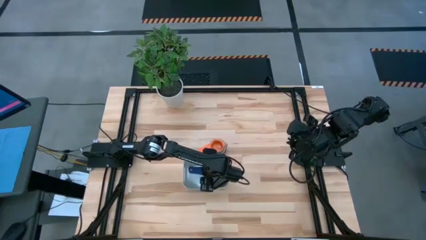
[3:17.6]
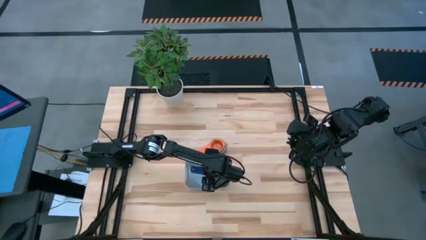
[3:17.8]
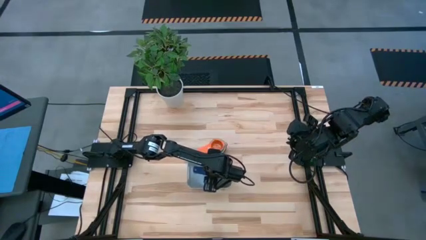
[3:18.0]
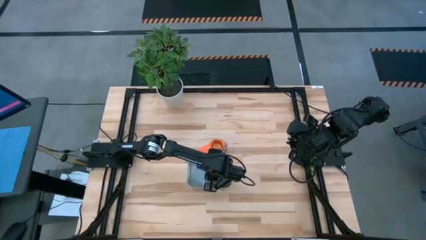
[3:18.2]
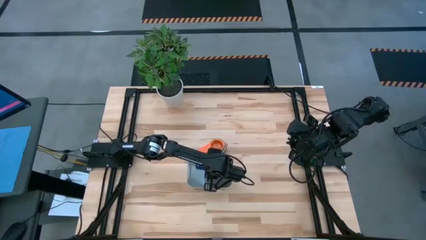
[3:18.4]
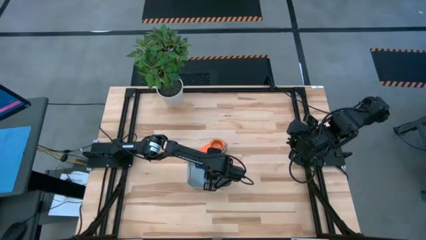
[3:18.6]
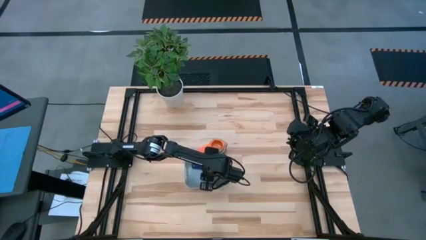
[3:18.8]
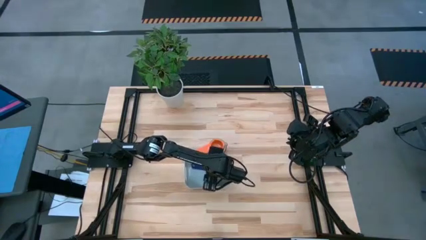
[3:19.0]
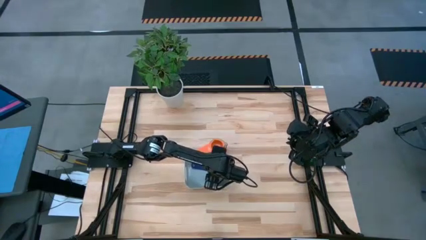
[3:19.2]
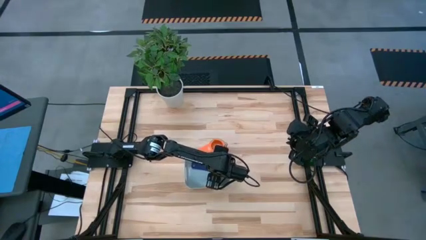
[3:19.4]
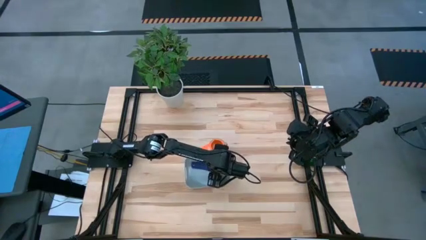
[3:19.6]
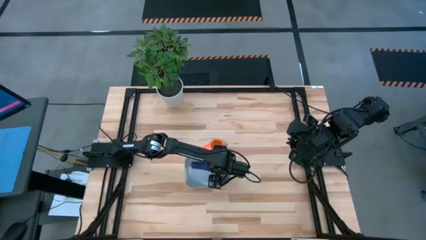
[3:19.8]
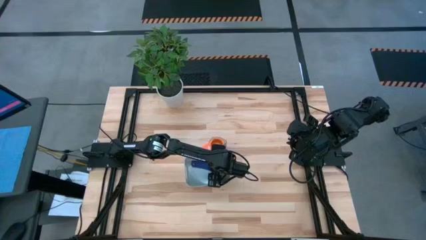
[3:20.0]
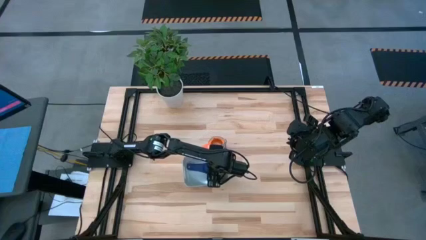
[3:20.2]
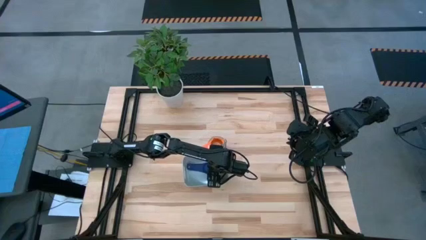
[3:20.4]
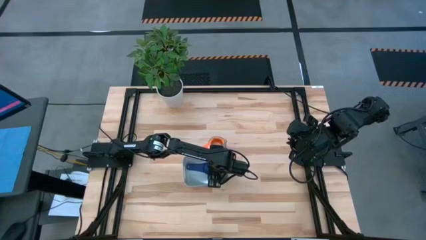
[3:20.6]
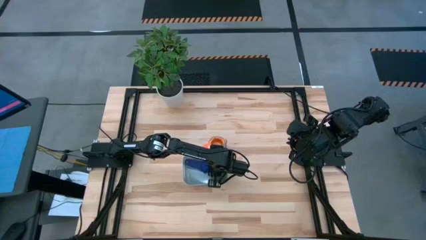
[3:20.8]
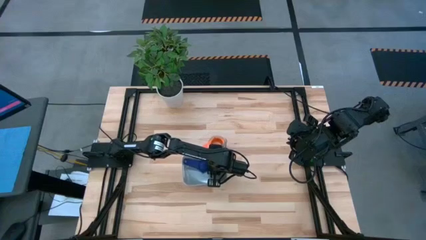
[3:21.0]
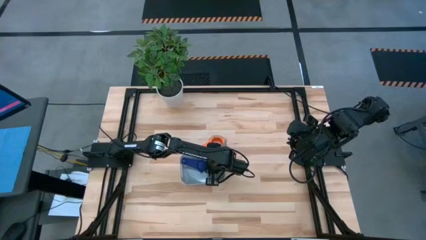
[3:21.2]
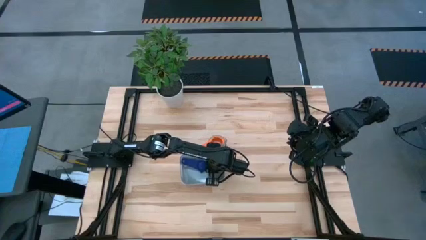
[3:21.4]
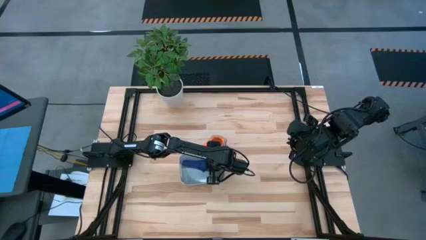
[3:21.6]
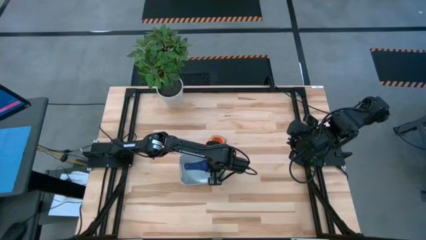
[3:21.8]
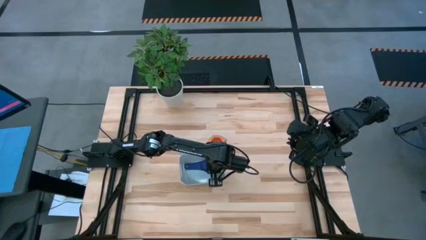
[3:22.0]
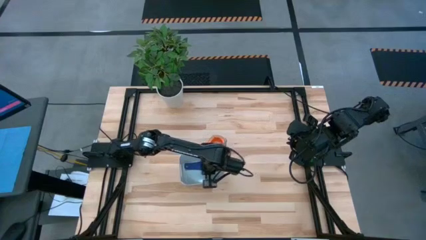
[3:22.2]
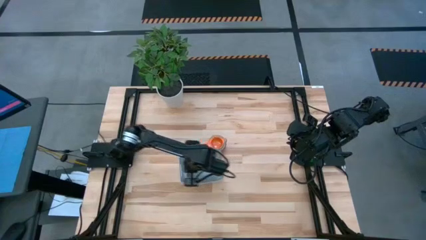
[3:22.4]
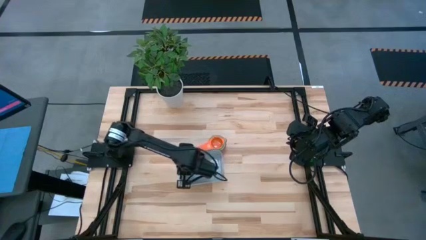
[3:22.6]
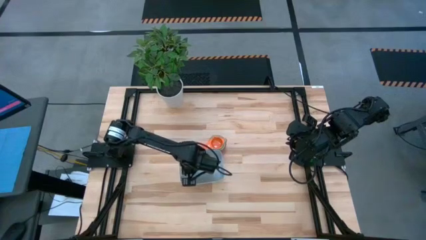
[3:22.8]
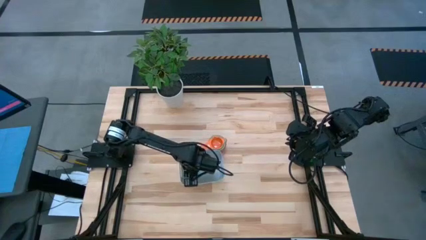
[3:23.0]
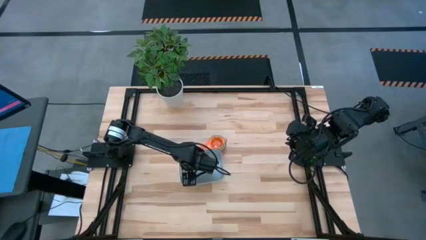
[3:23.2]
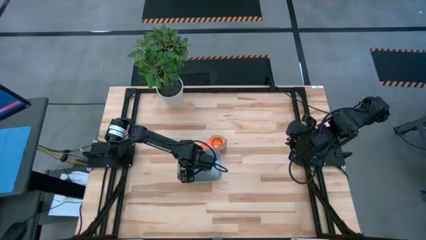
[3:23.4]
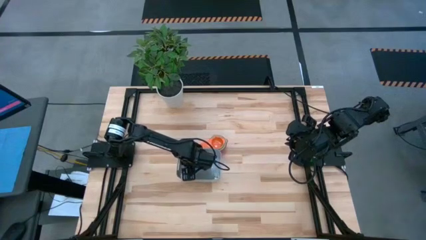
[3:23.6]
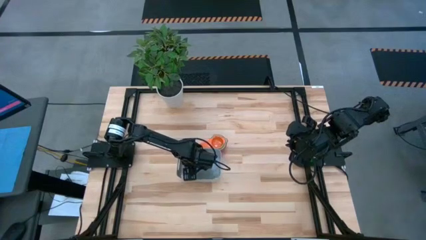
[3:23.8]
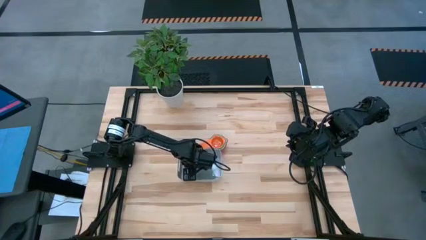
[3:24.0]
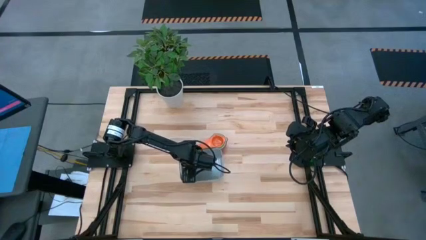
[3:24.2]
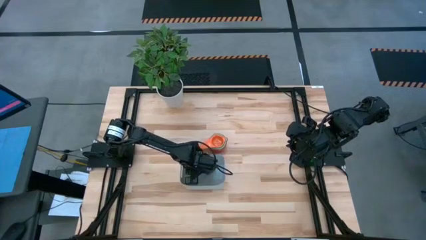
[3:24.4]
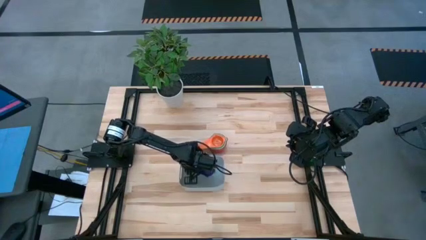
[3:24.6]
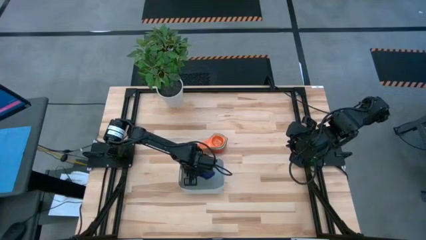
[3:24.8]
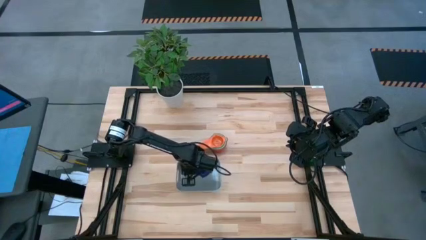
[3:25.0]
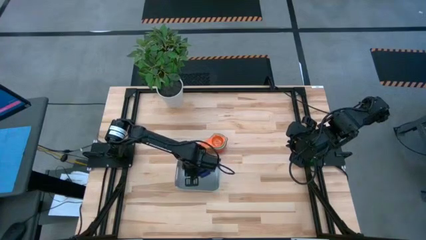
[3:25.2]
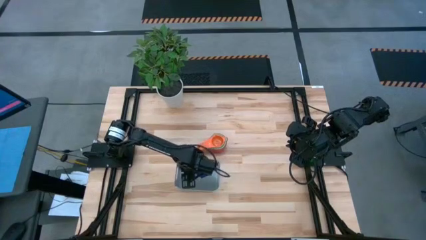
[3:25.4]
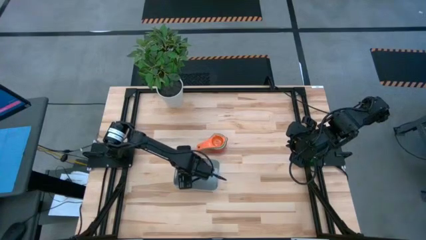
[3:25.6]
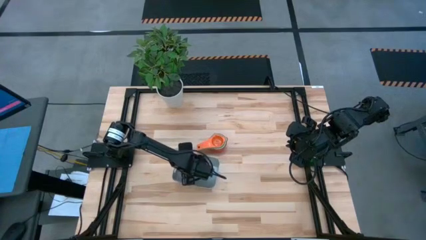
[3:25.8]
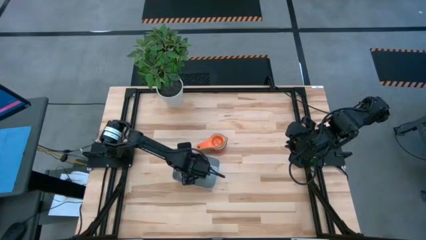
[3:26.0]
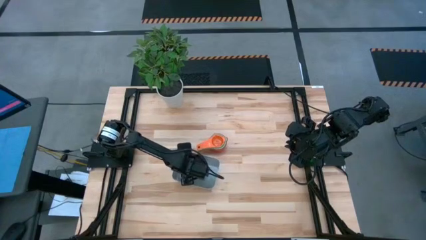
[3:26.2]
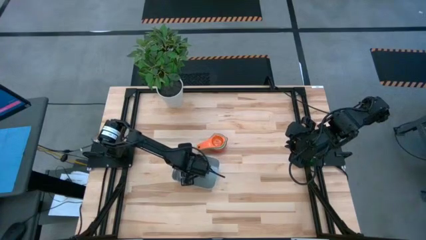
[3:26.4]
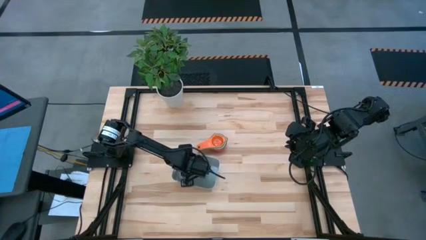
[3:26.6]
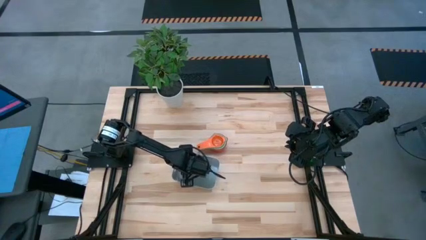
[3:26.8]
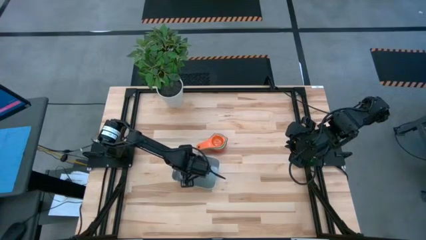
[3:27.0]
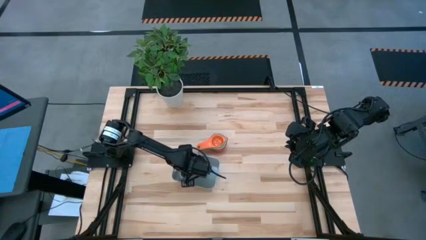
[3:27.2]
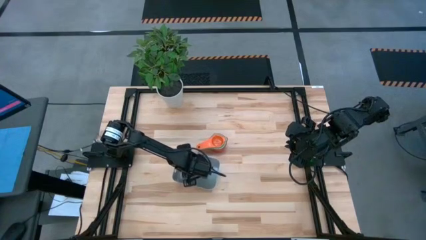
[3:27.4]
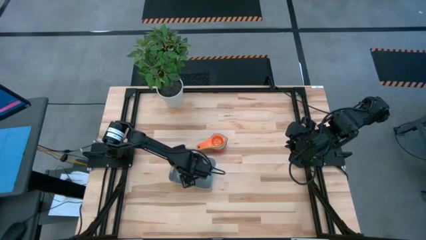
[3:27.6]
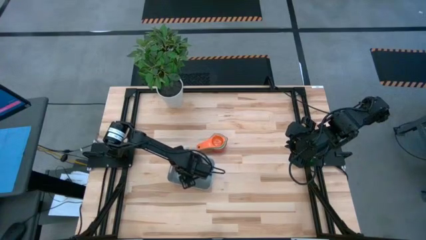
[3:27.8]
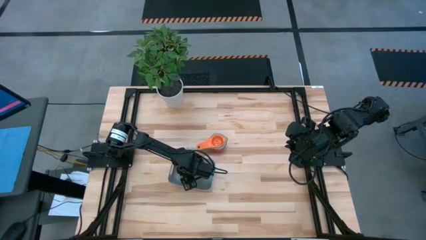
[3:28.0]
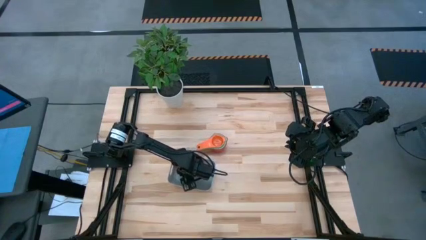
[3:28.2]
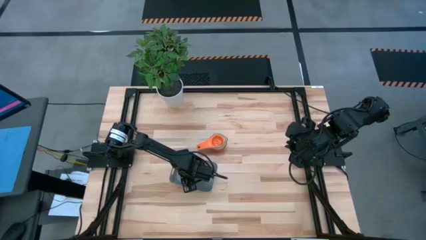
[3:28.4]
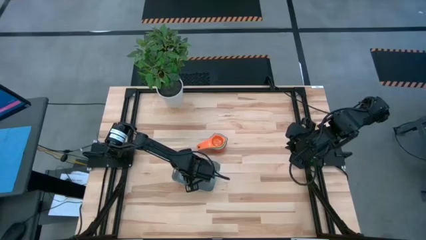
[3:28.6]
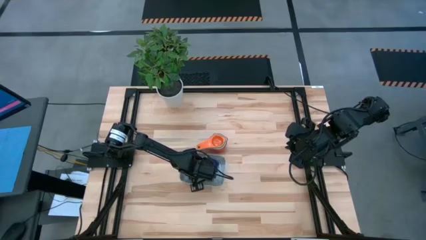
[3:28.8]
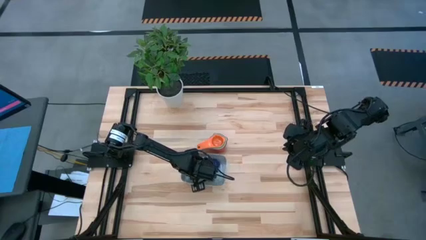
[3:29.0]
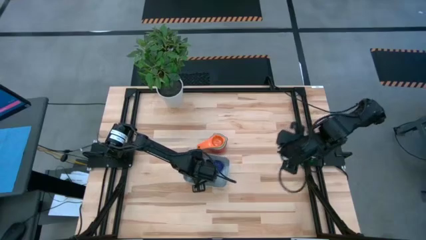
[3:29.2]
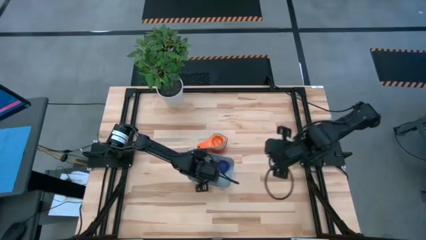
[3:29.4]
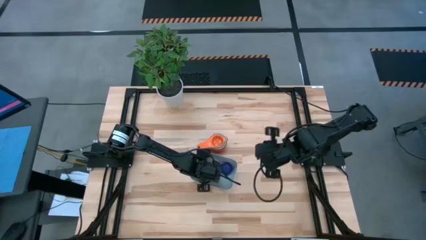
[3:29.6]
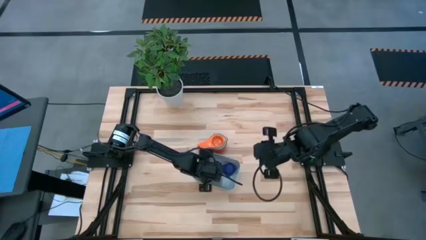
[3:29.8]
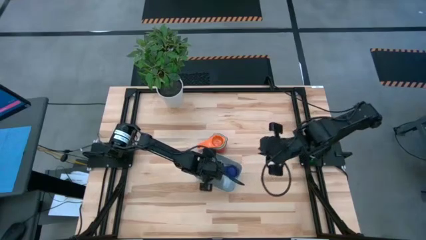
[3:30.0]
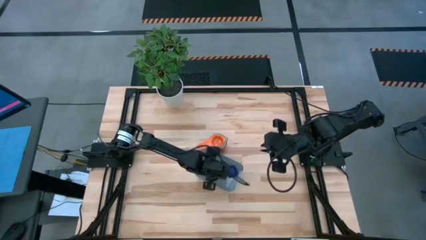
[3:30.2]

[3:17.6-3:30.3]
Task: Nest measuring cups in basket
Remove the dark blue measuring cup from the gray bin

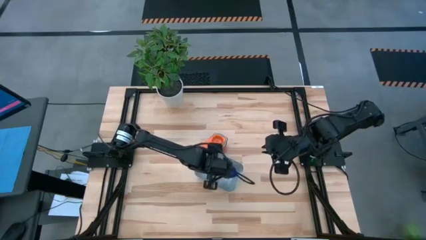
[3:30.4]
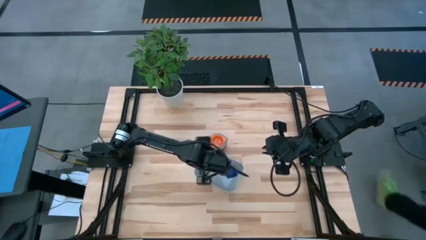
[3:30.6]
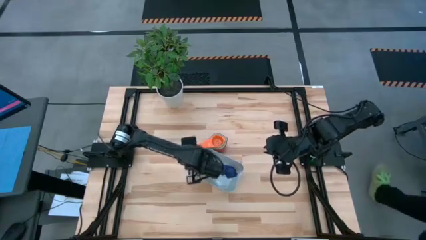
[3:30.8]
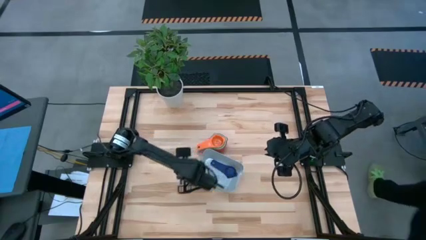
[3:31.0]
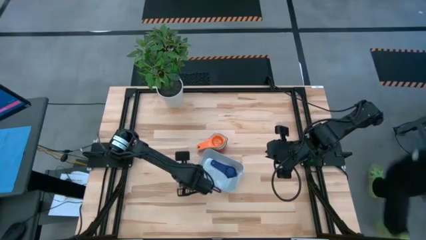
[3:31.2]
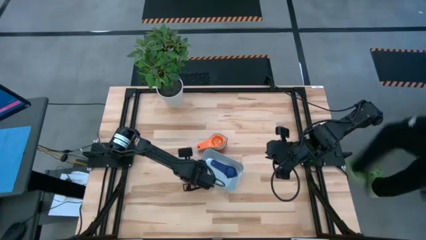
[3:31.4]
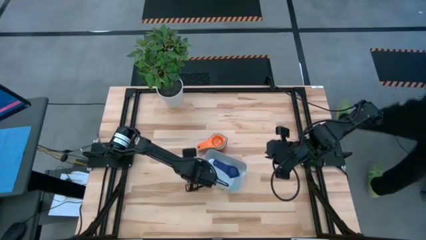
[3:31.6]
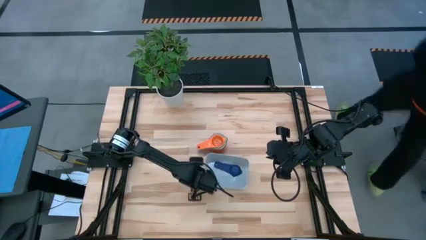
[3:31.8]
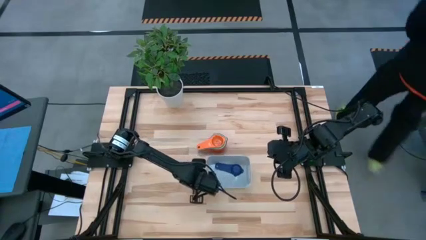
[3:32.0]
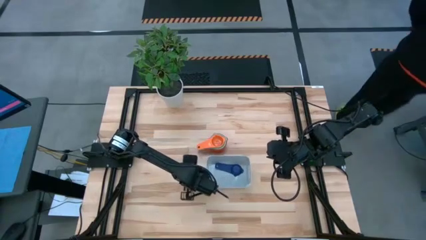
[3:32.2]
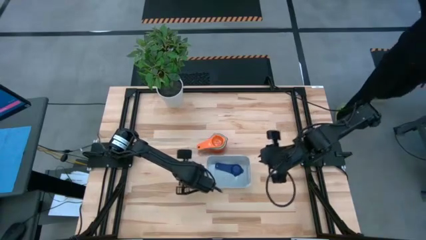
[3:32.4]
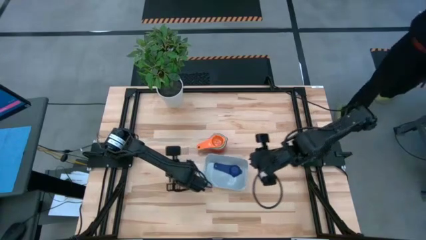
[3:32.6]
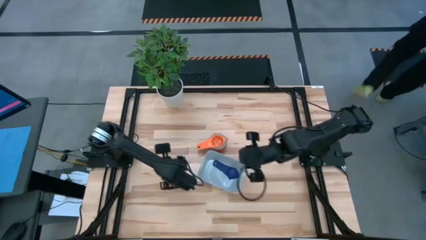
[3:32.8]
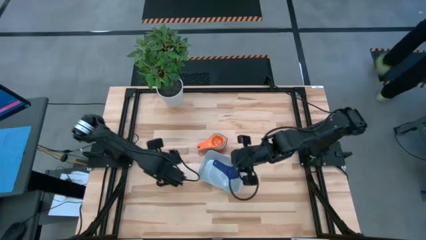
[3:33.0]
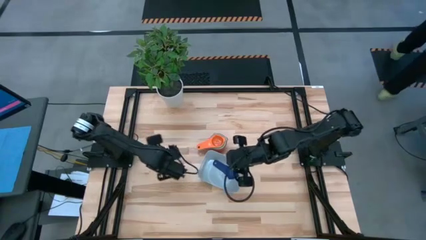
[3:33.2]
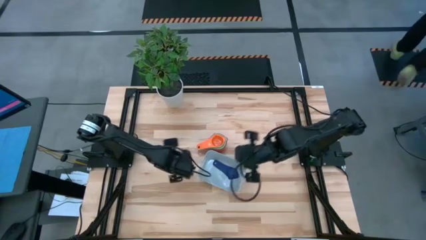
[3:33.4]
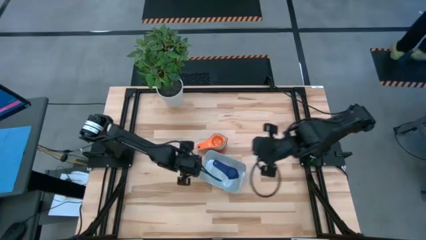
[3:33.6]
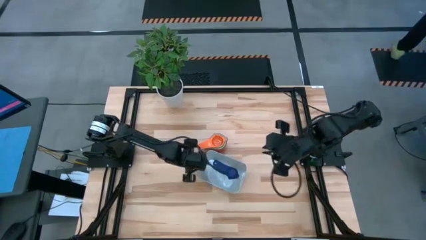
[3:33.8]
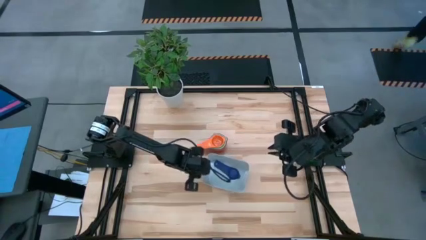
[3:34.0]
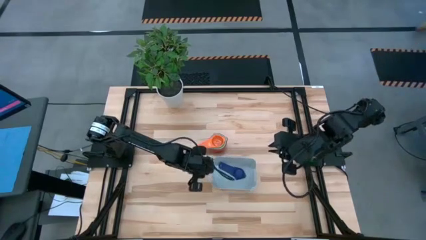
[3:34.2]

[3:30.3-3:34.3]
Adjust the gray bin

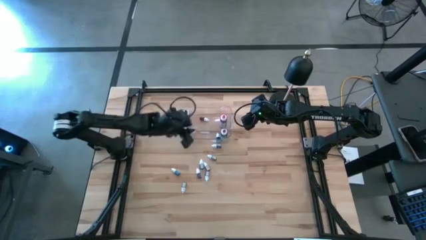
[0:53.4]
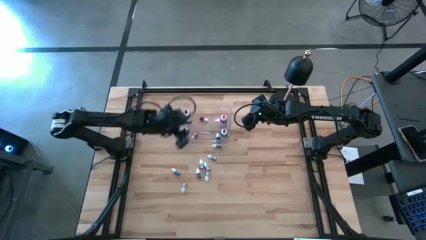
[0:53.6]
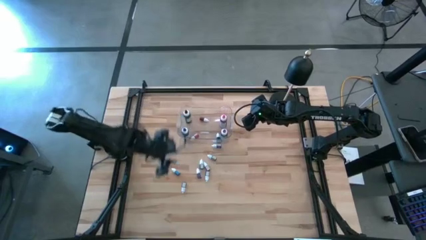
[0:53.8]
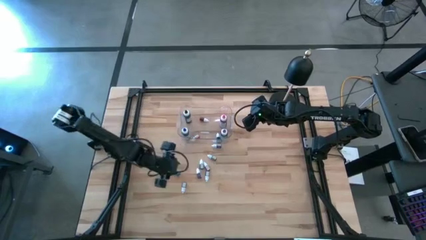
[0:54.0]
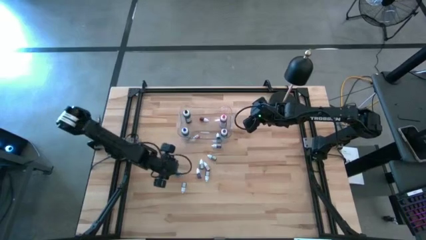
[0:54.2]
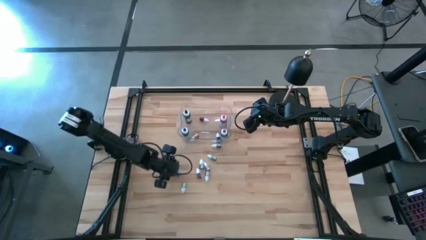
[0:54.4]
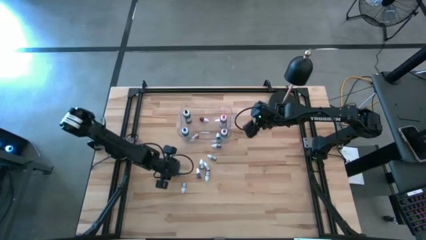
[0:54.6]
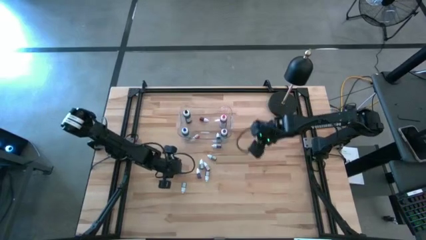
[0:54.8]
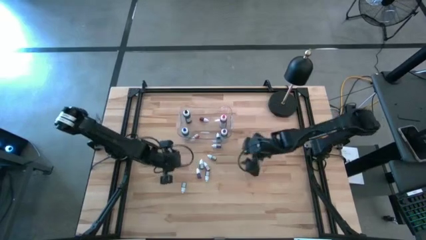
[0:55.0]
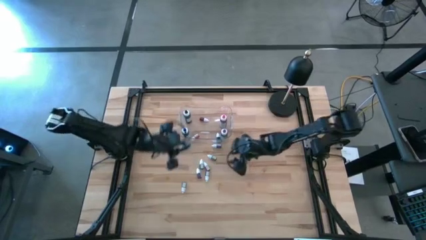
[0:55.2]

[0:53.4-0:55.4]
Task: Pick & Place food coloring
Put the small blue food coloring bottle into the transparent bin
